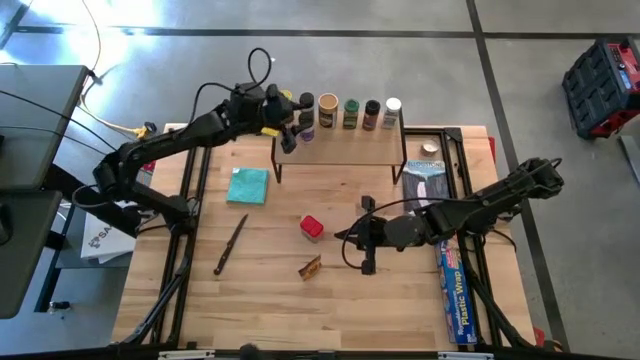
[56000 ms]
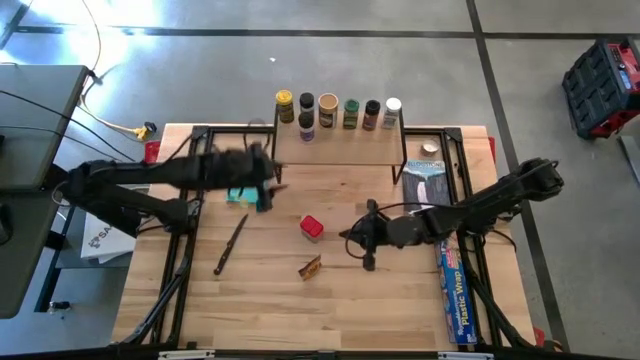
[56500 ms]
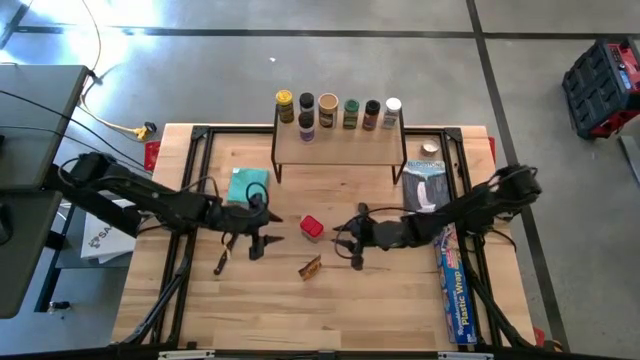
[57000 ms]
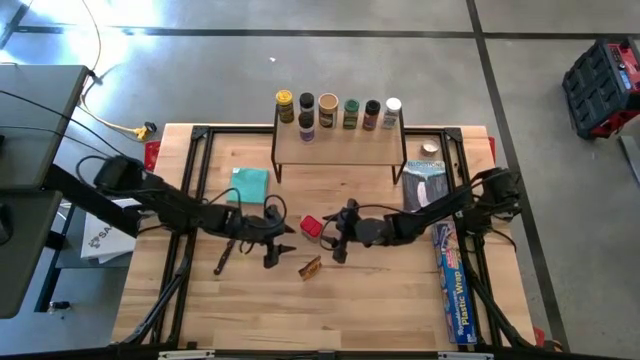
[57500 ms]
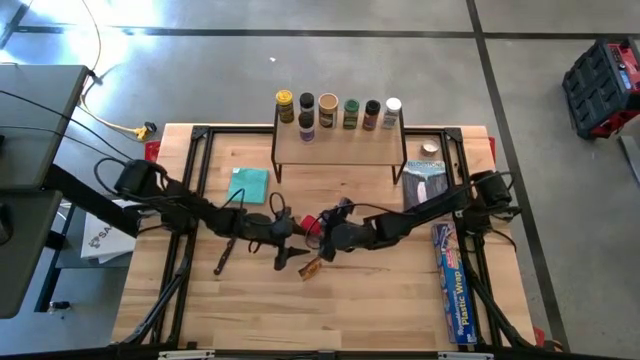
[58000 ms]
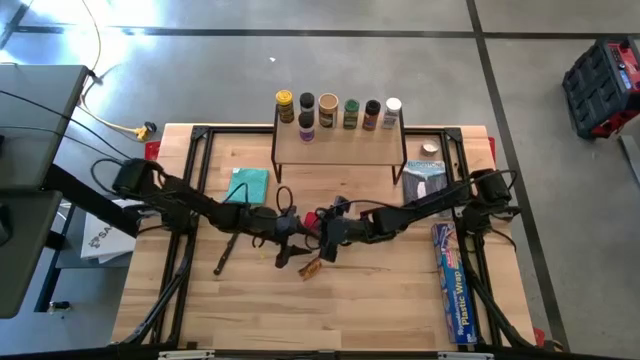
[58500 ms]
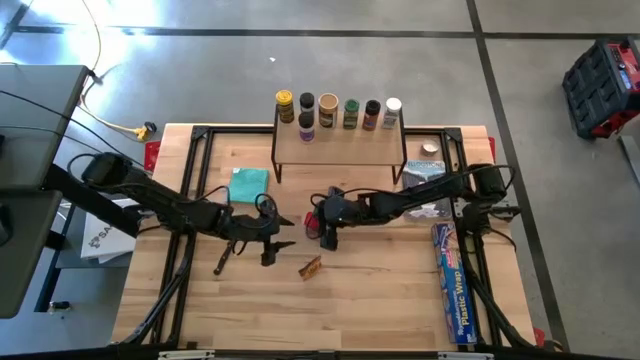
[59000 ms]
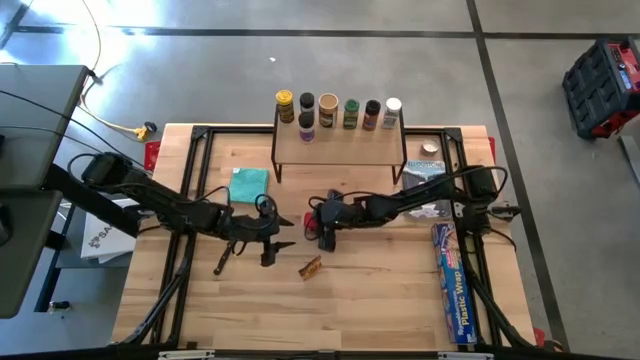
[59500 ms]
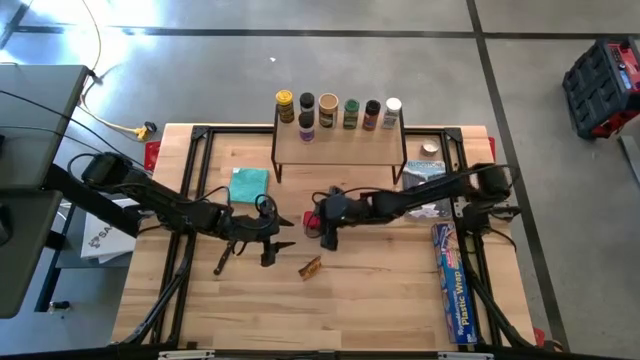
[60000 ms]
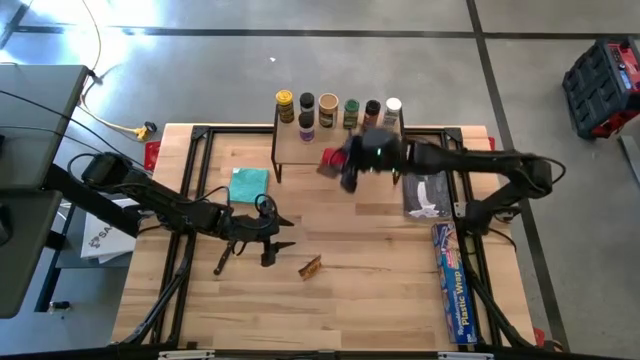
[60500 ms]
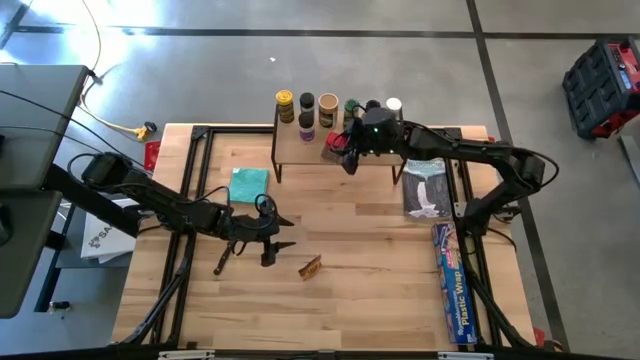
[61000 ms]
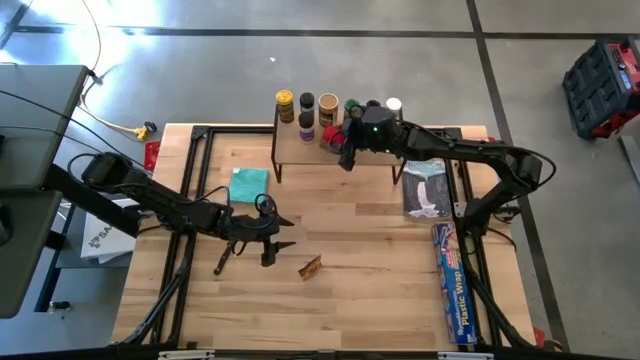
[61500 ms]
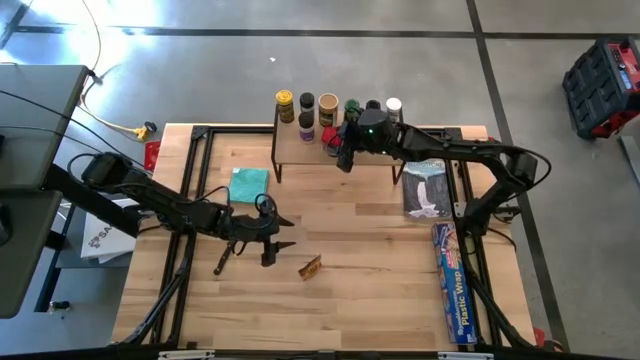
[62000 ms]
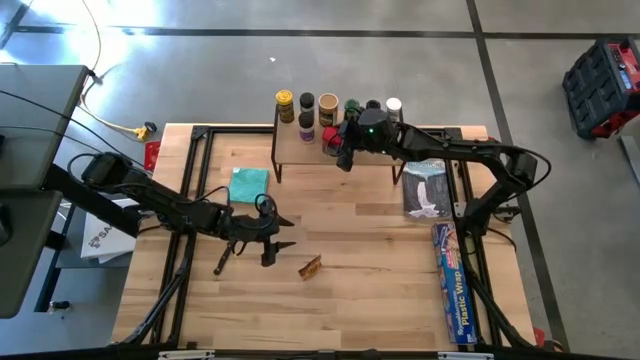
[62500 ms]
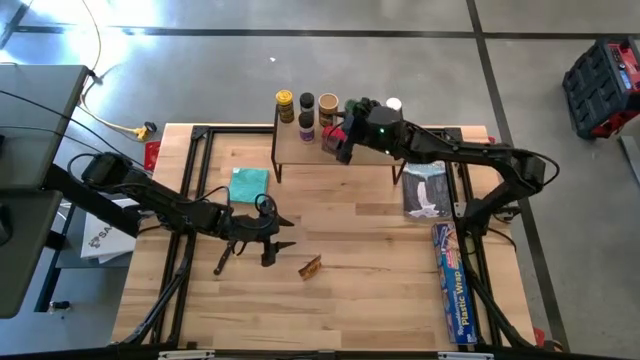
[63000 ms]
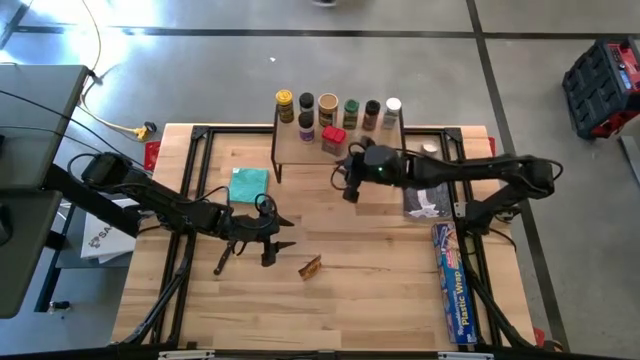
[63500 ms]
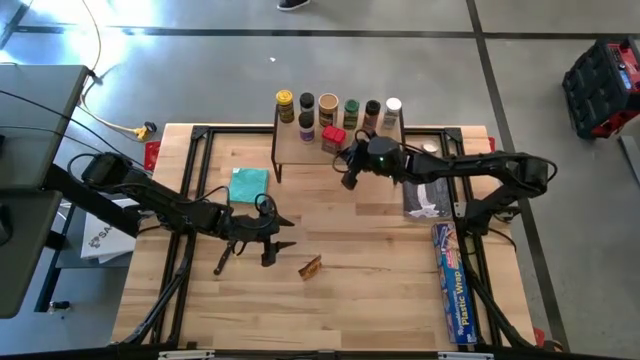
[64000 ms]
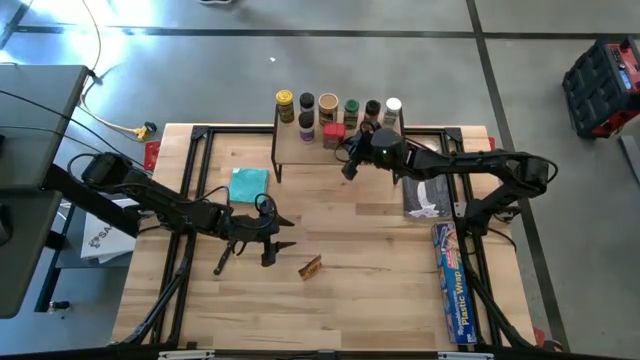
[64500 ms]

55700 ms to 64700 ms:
Task: Shelf spices
Put the red spice can on the shelf

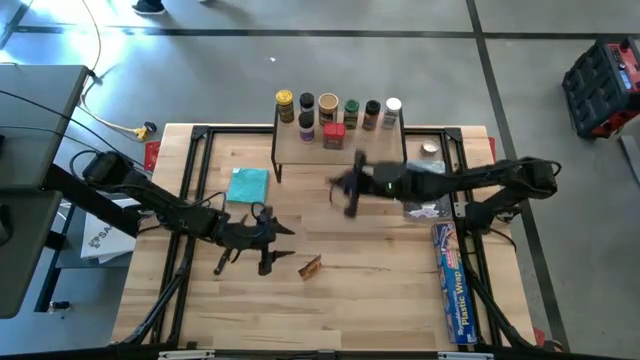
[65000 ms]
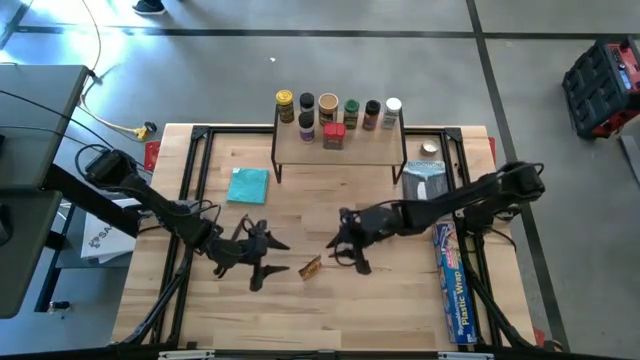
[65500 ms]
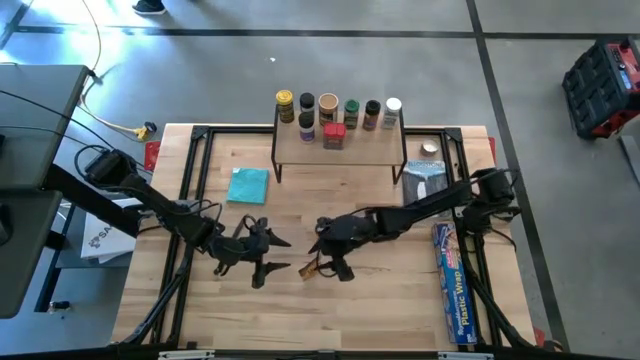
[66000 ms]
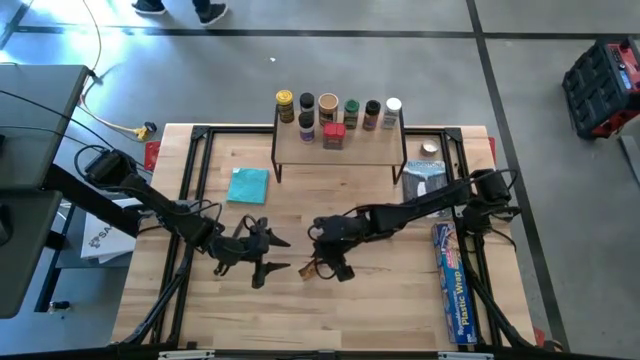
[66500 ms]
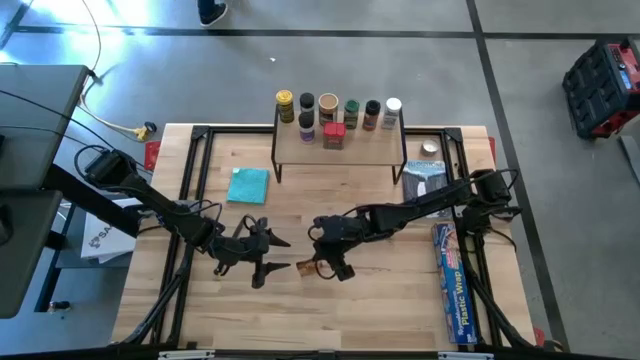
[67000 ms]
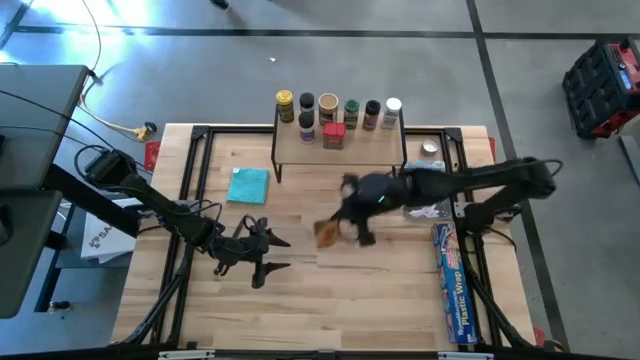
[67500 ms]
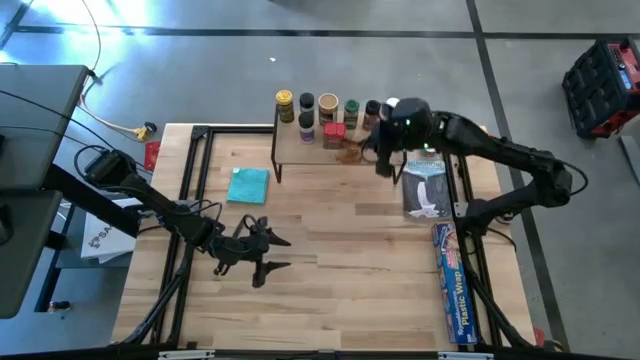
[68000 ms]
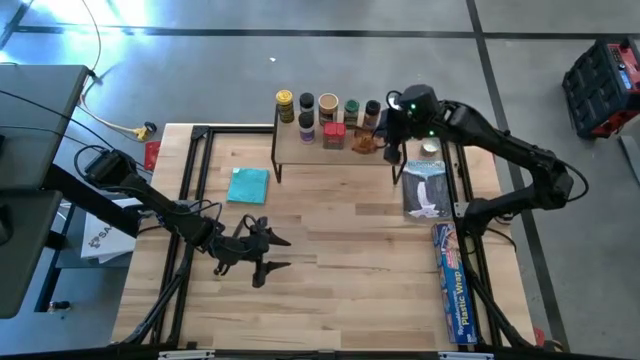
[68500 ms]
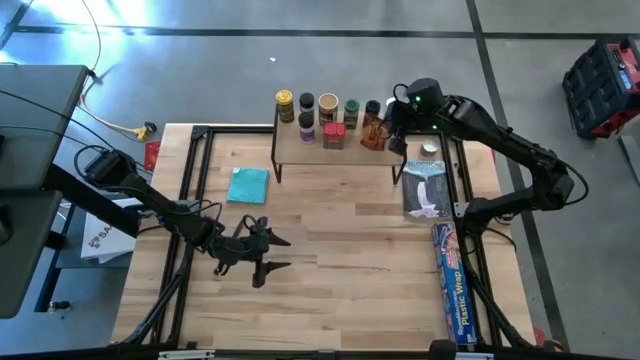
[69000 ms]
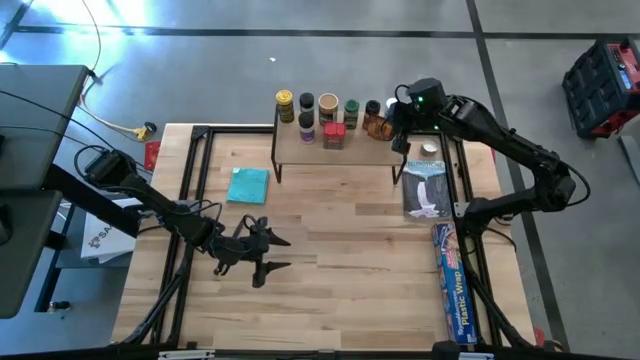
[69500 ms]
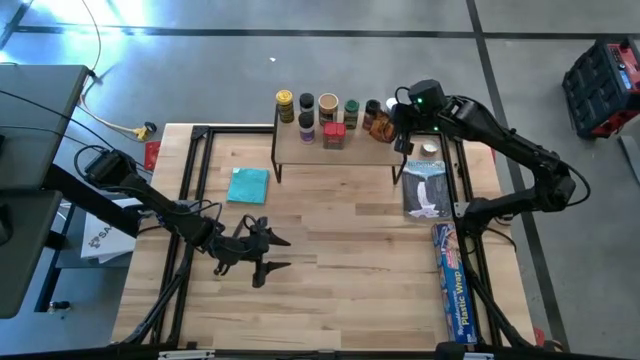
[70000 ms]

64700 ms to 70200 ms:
Put the orange spice bag on the shelf

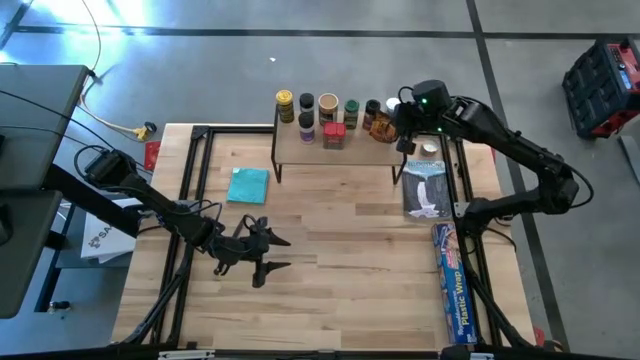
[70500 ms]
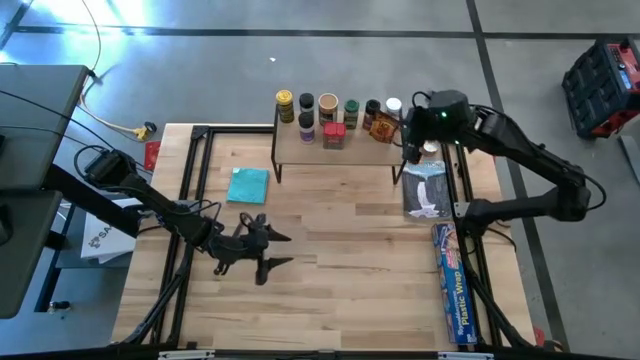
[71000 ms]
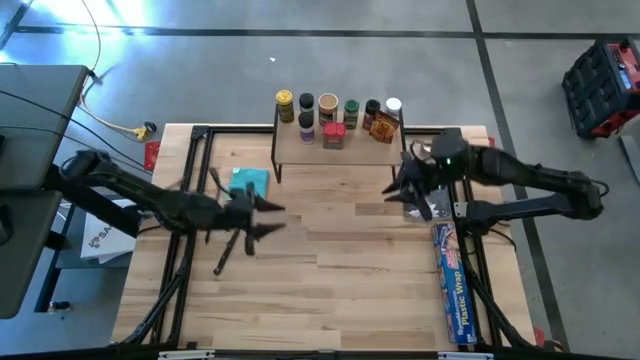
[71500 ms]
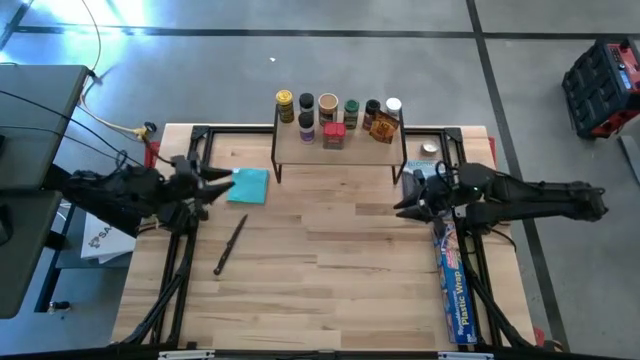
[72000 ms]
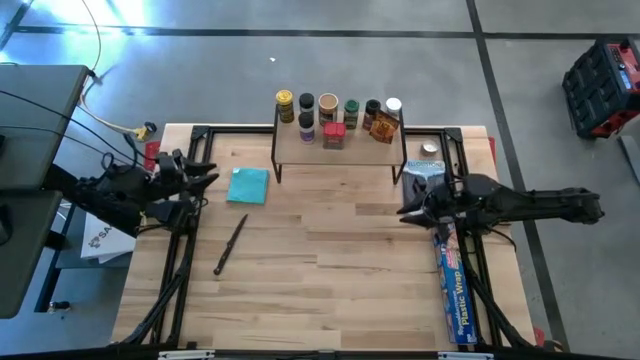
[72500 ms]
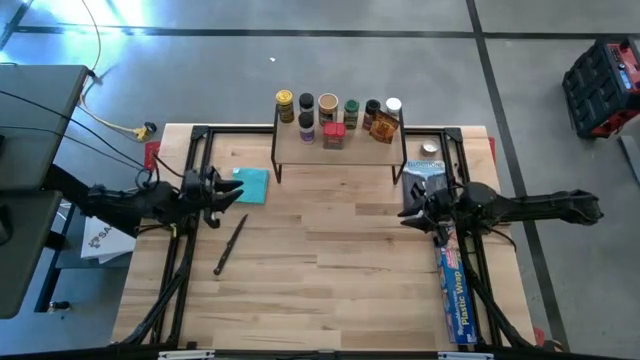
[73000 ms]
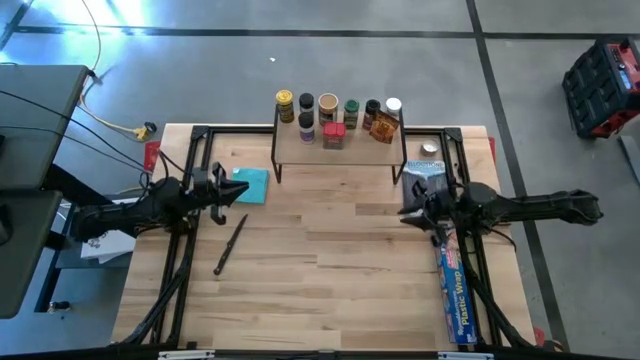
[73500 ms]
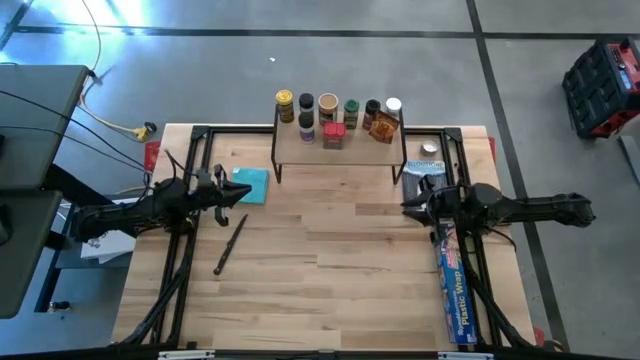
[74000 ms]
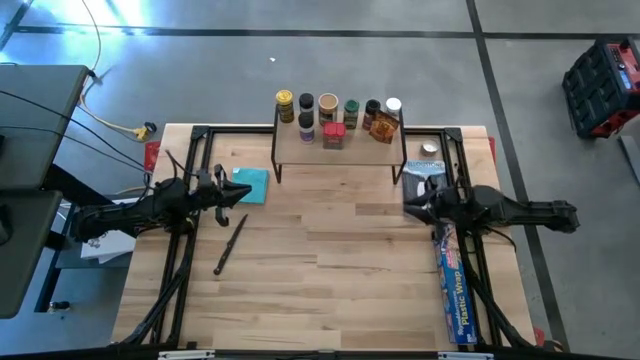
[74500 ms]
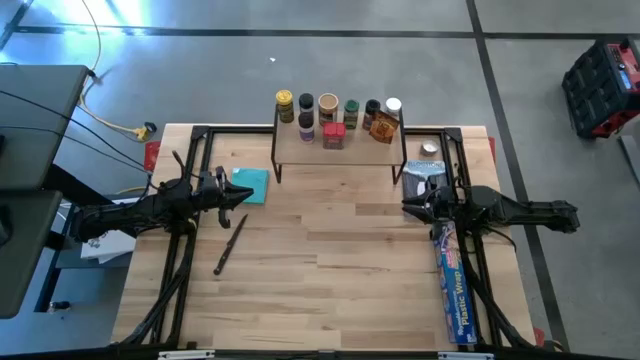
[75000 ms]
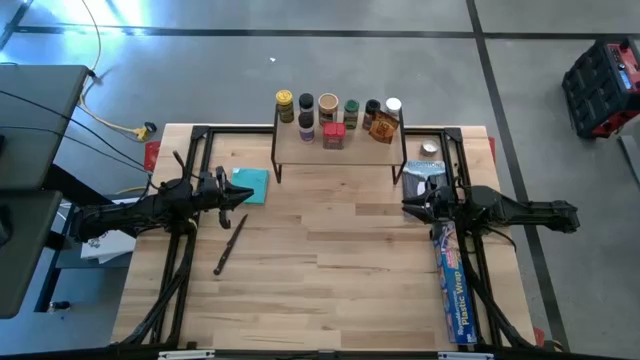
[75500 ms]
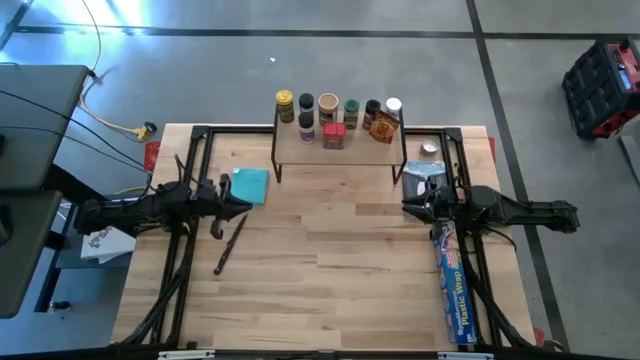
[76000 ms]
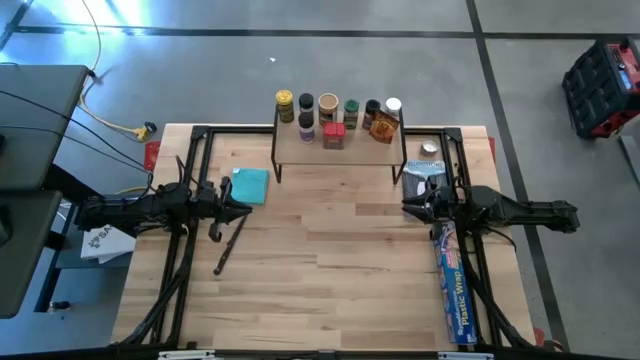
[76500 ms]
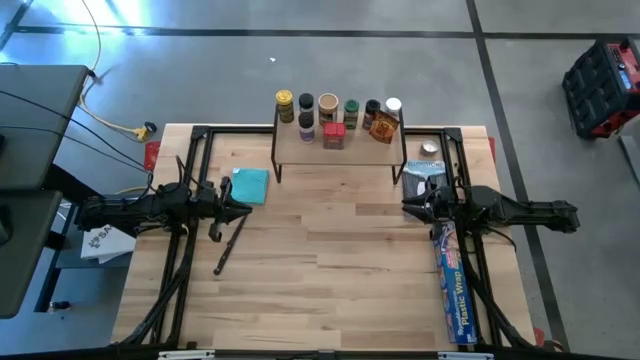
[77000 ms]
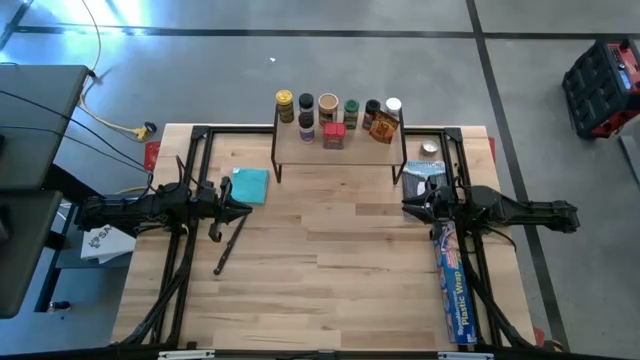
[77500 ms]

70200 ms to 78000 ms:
Return to Home Position
